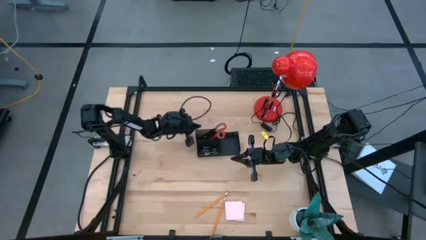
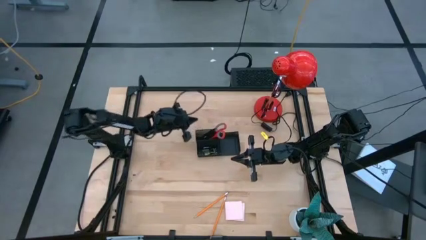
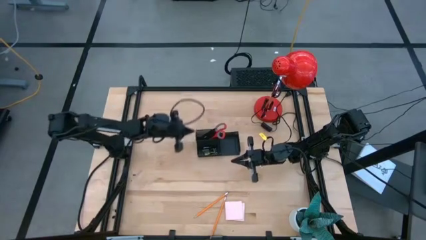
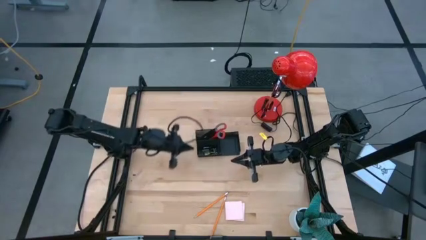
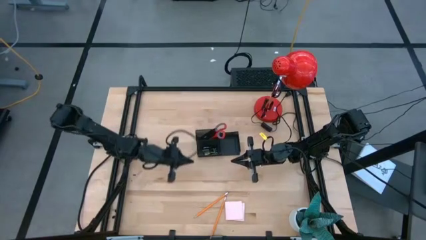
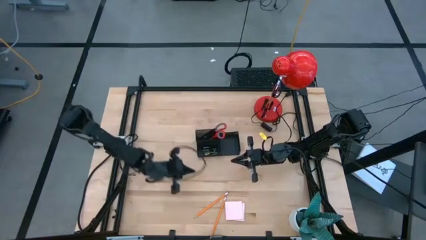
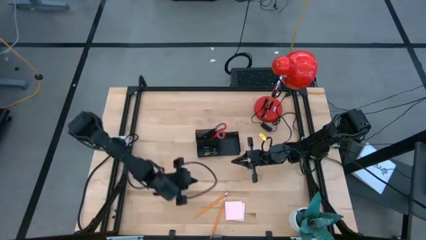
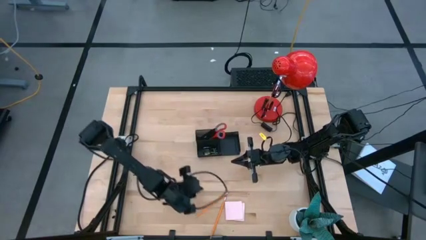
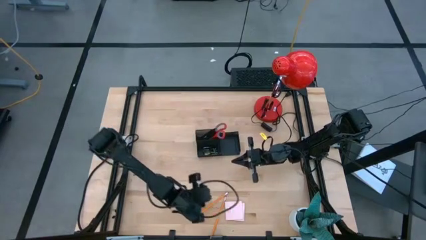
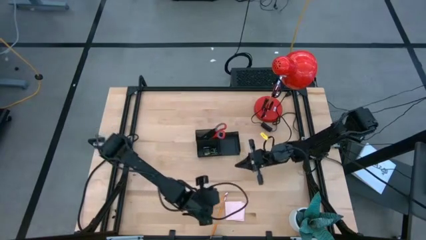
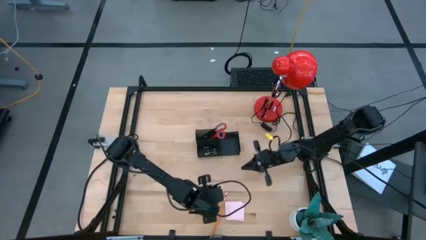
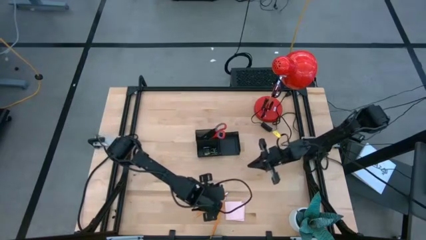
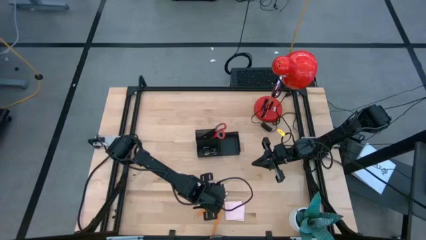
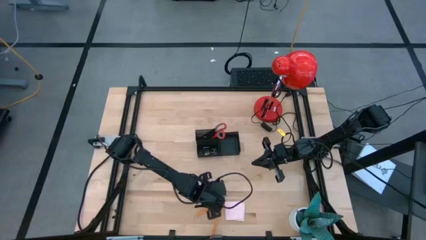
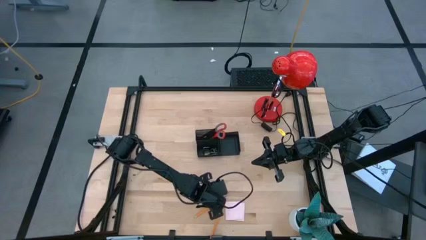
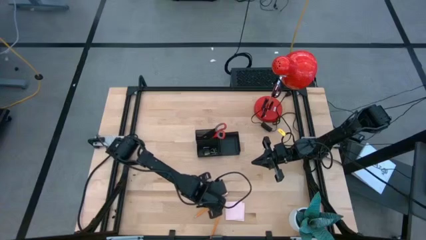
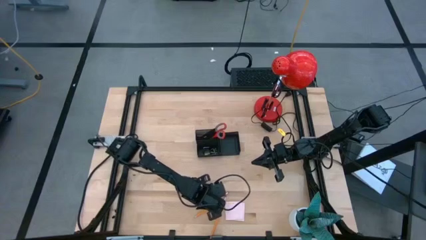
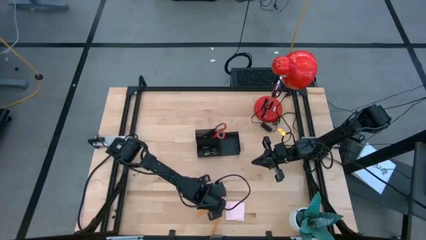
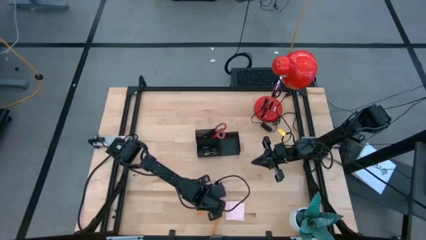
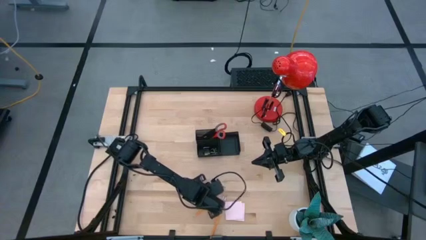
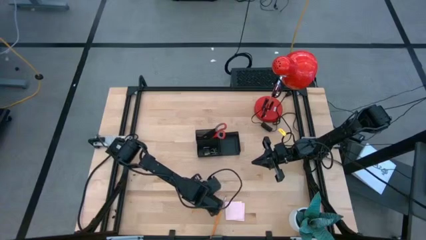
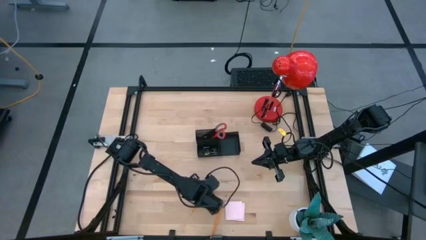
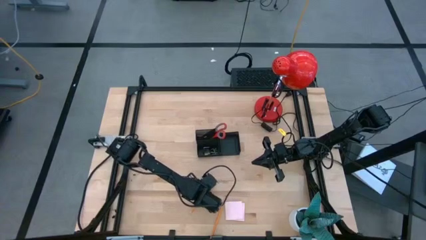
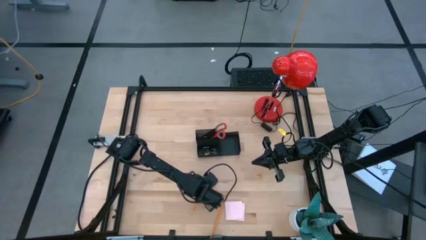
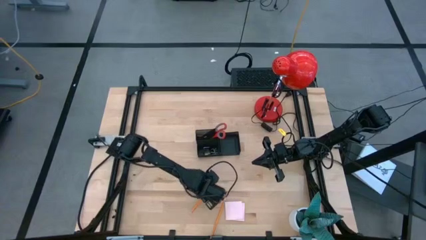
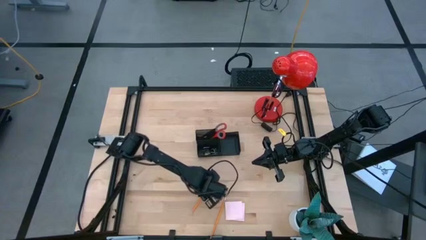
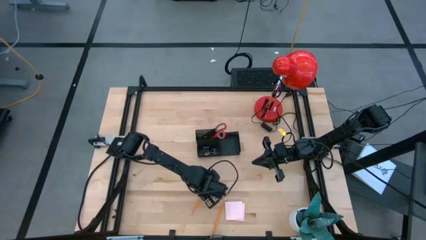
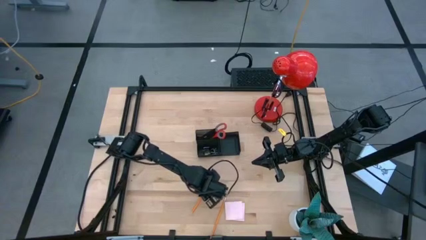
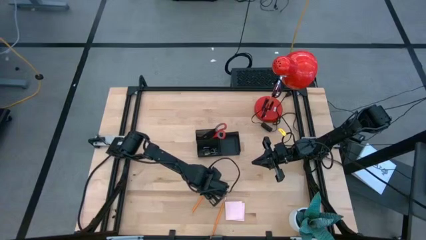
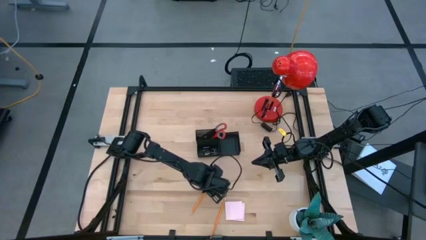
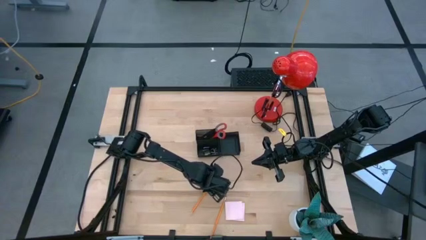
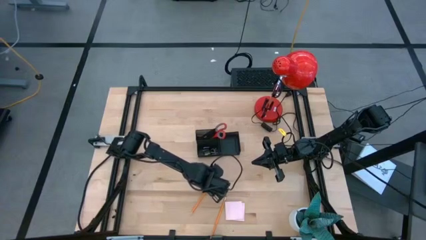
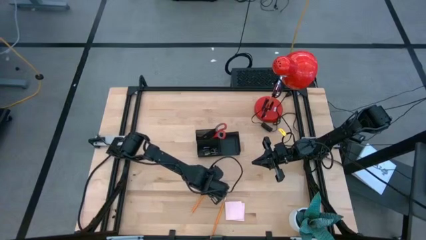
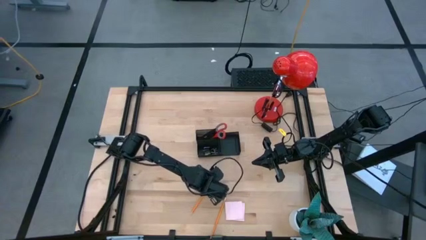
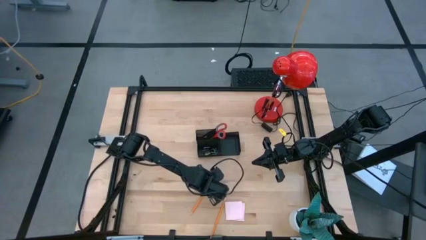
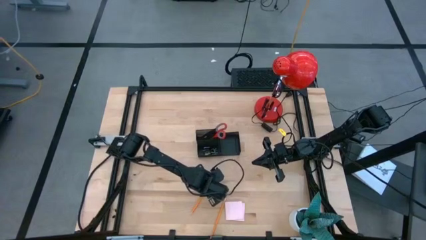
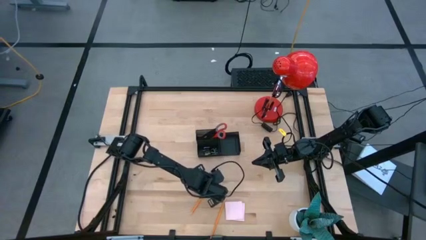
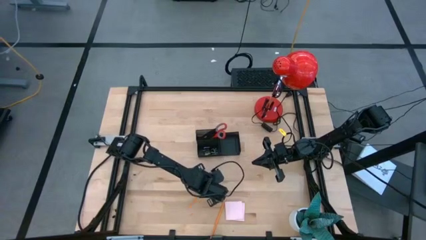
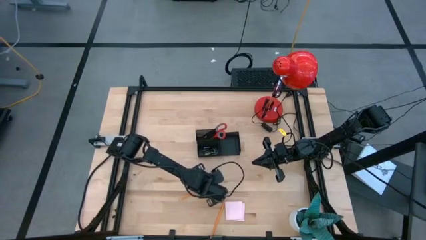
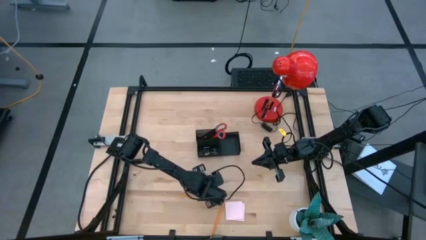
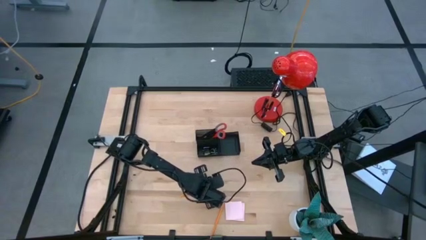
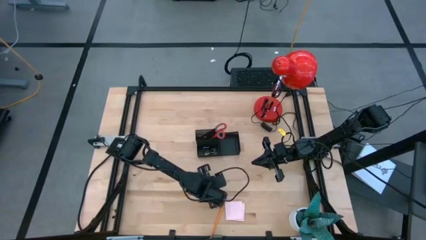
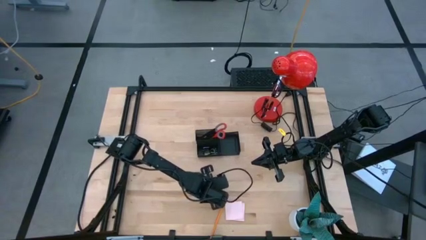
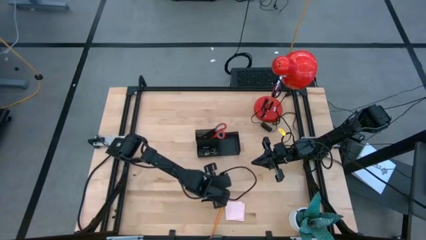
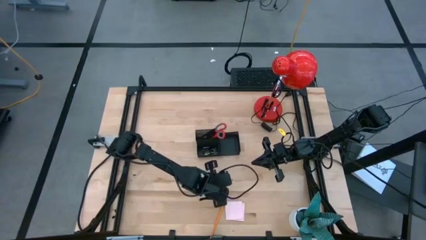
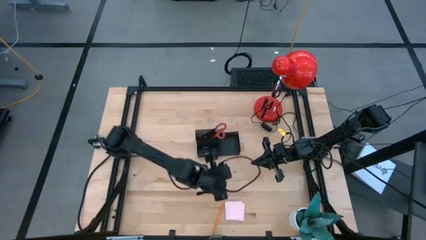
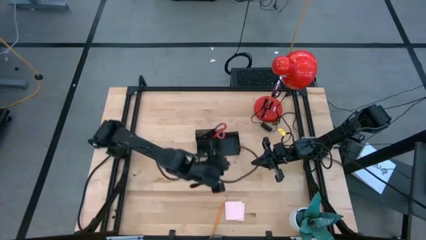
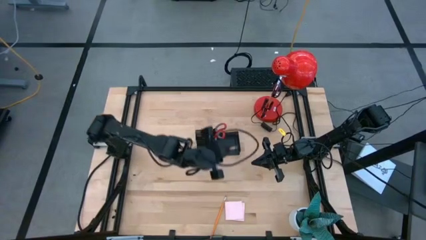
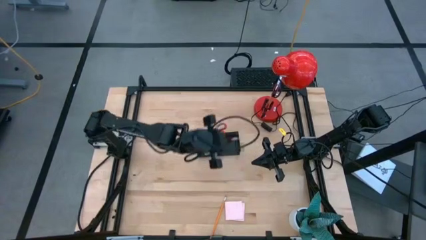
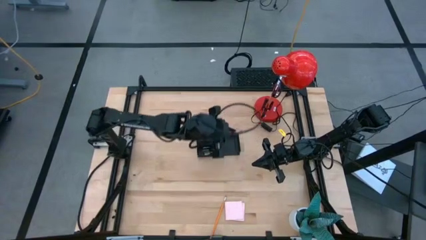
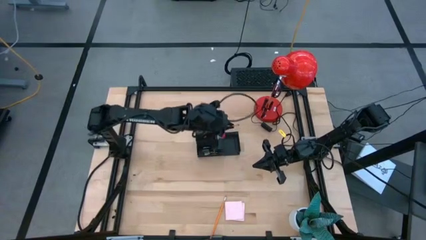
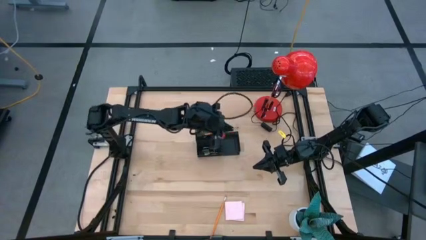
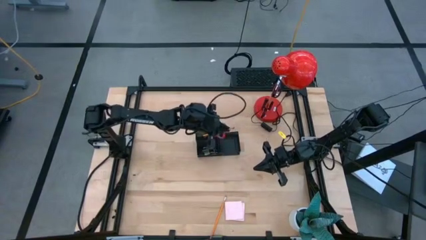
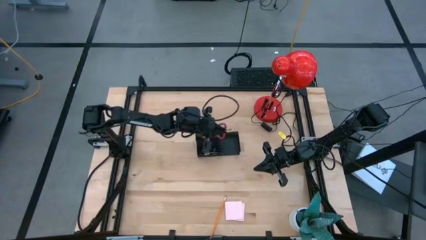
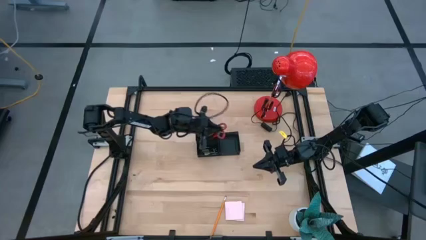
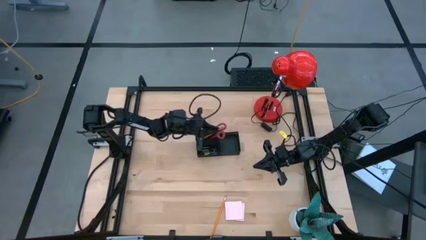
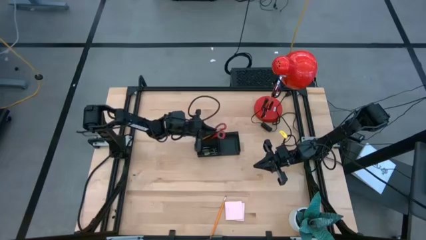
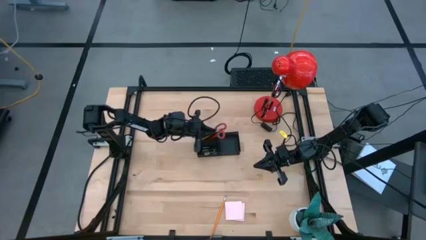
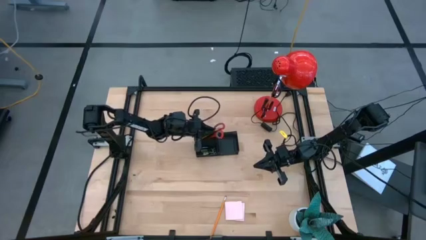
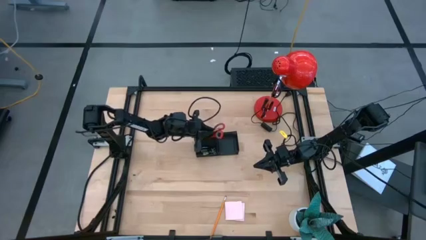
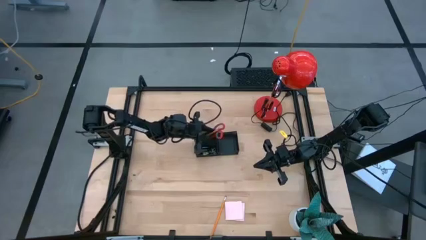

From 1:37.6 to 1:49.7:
Task: Pick and place office supplies into organizer
Put the left pencil into the desk organizer
